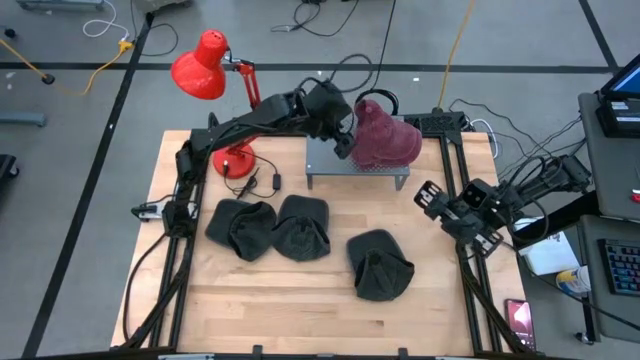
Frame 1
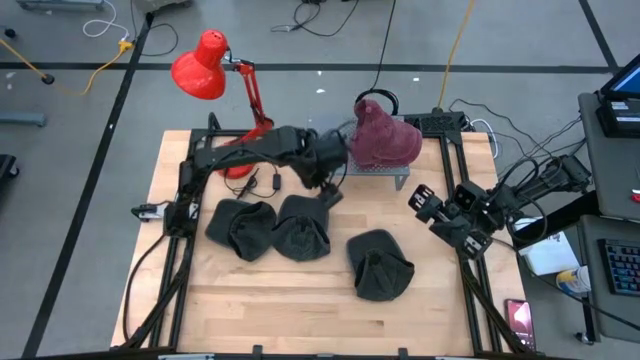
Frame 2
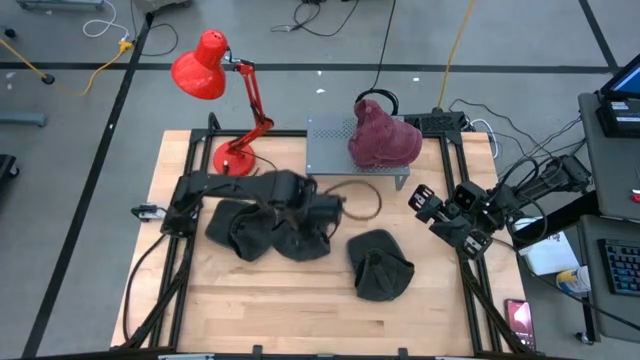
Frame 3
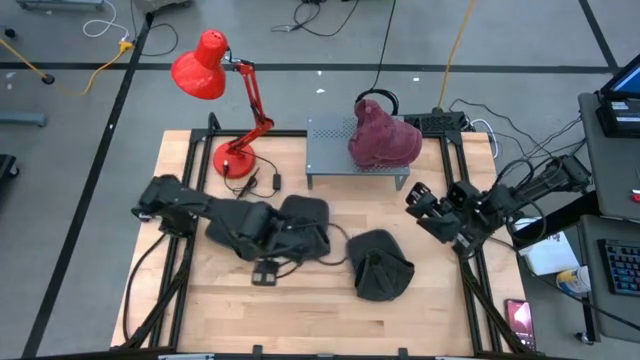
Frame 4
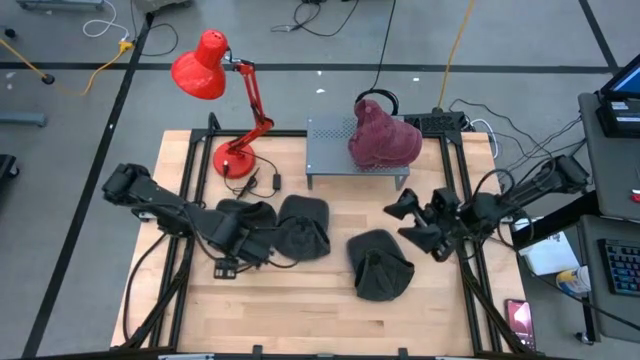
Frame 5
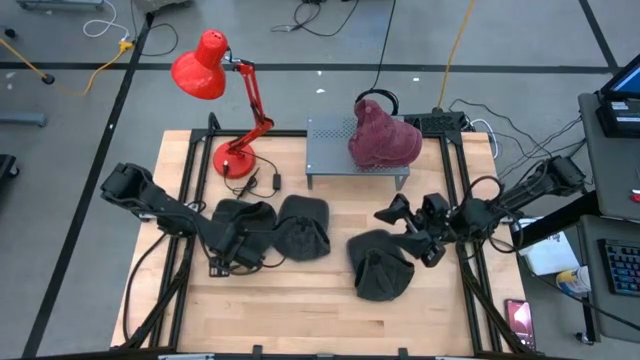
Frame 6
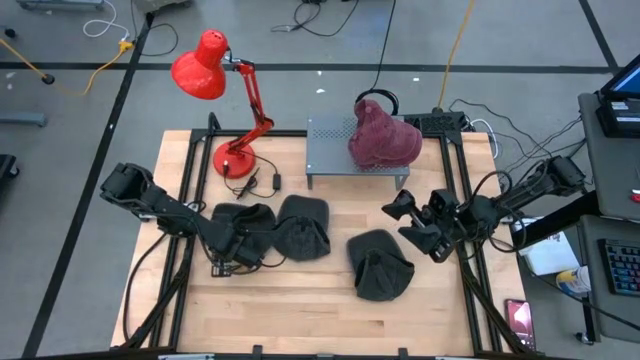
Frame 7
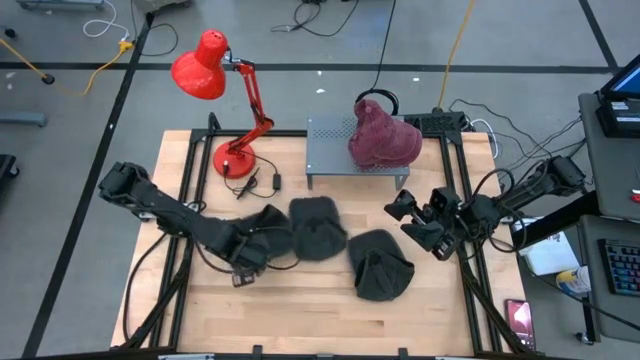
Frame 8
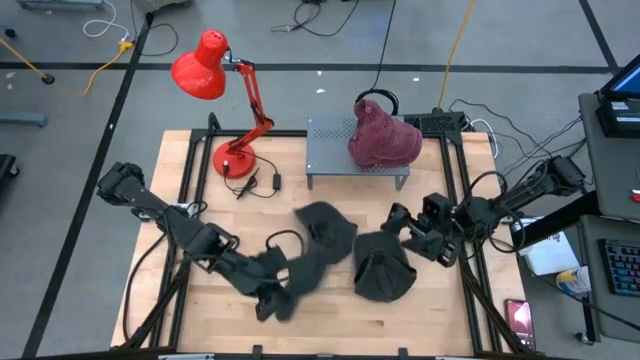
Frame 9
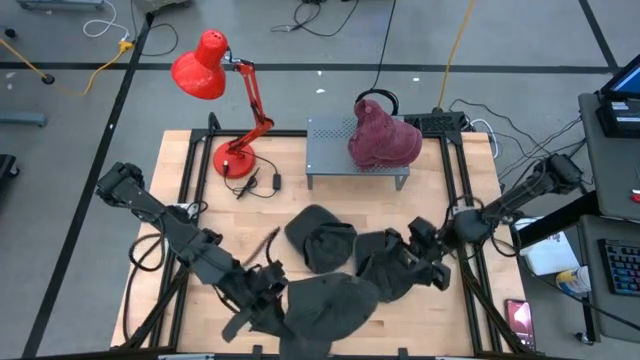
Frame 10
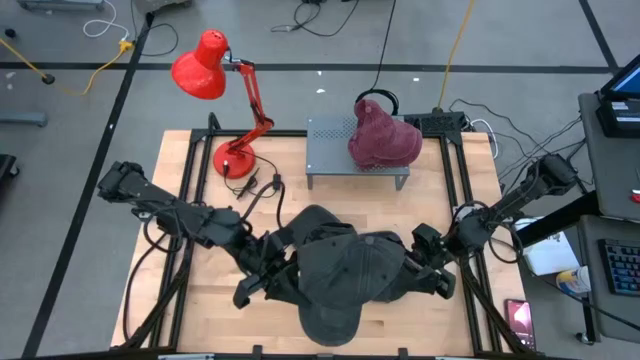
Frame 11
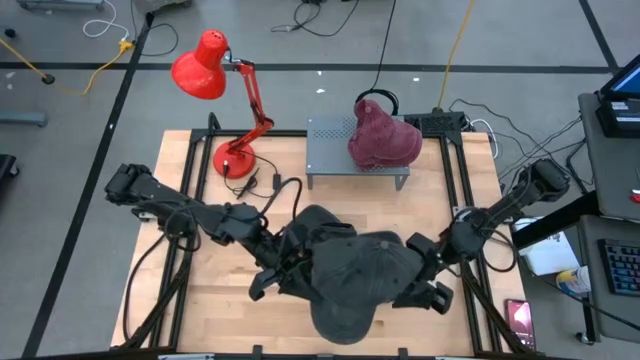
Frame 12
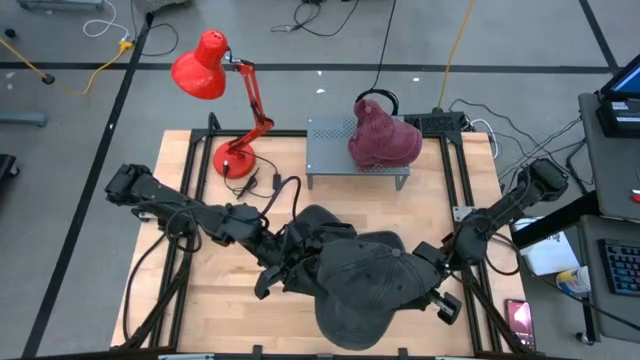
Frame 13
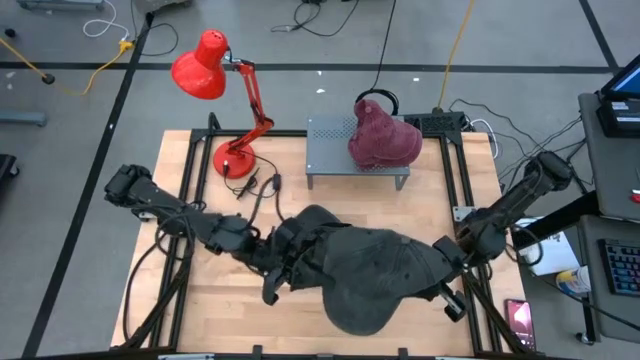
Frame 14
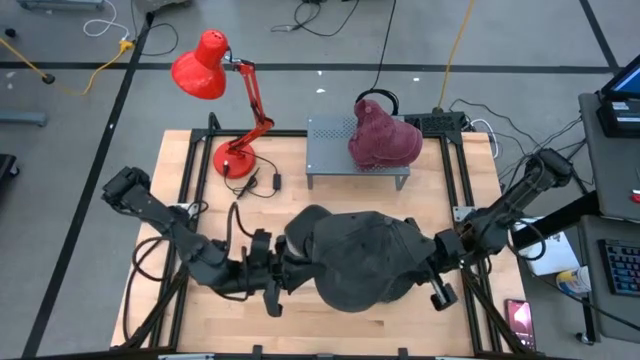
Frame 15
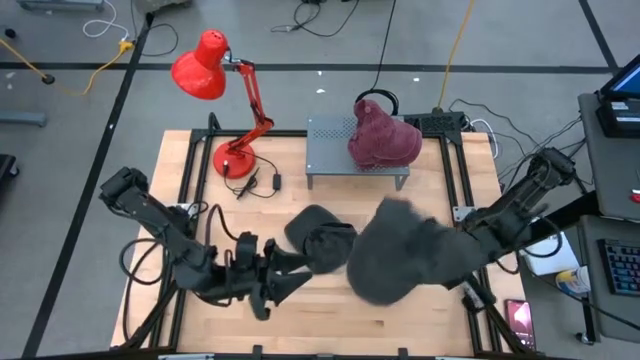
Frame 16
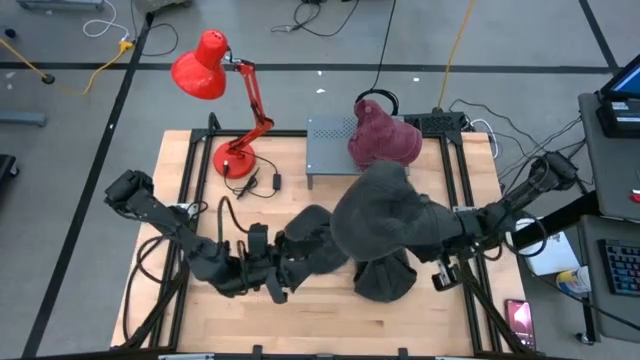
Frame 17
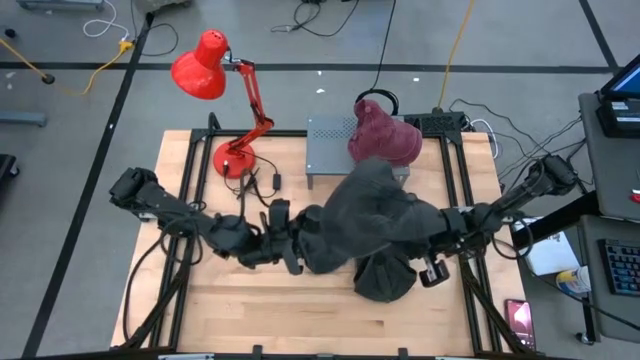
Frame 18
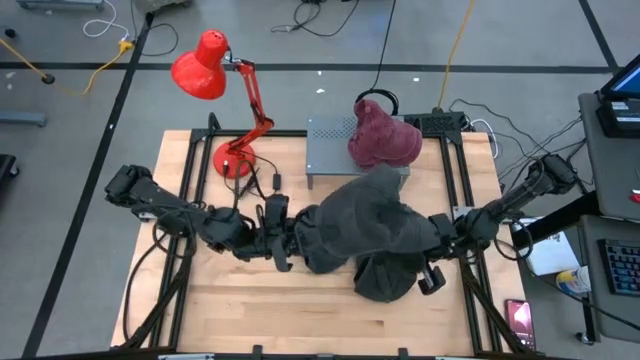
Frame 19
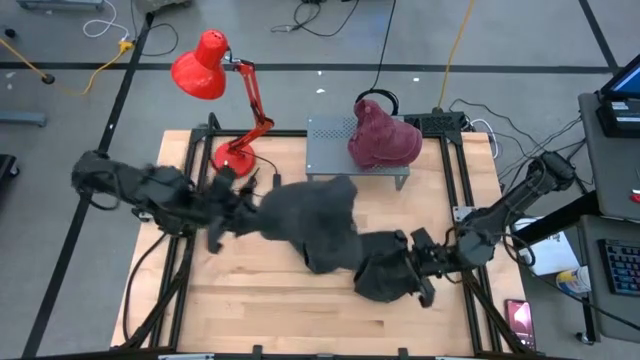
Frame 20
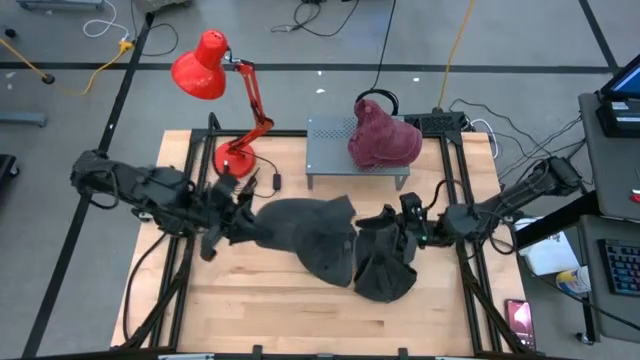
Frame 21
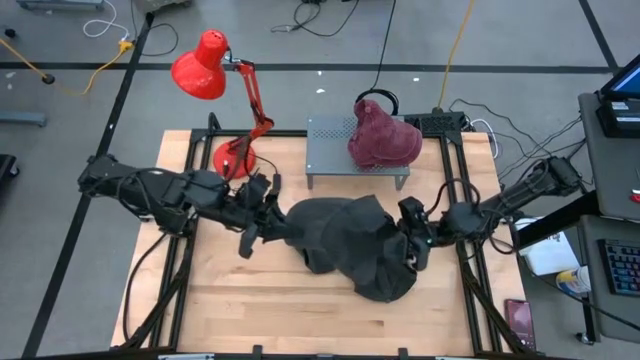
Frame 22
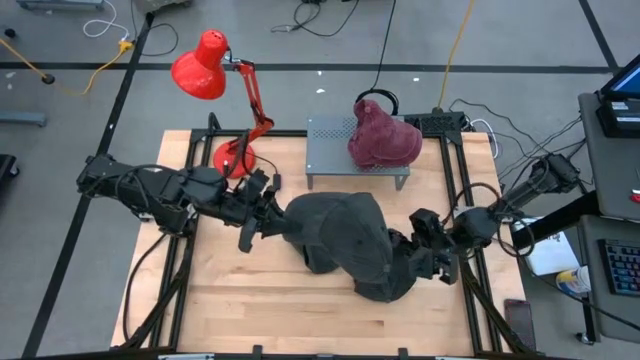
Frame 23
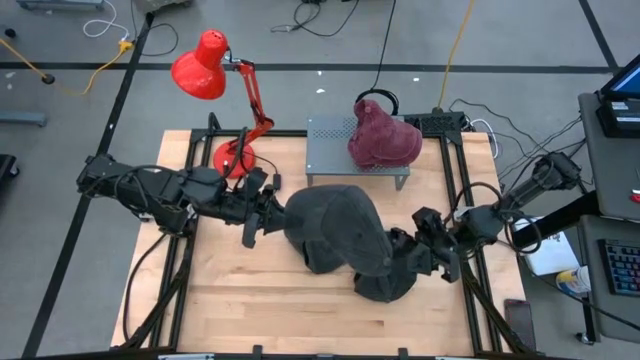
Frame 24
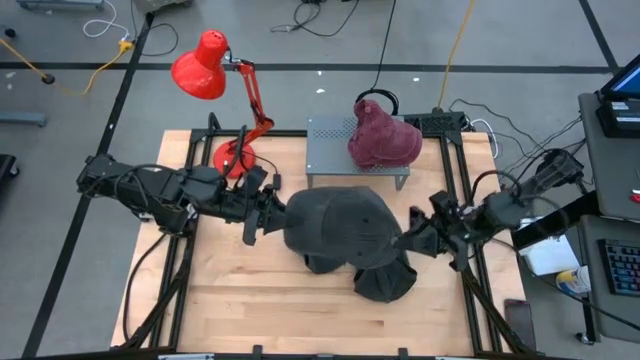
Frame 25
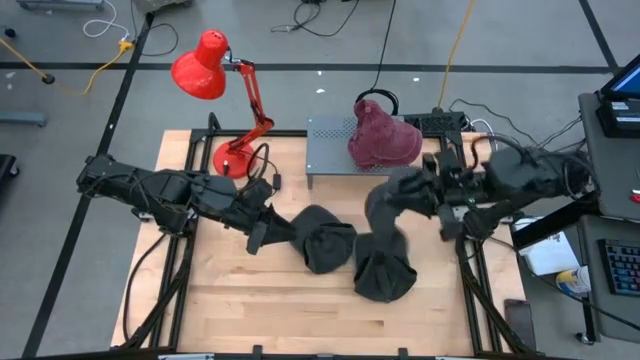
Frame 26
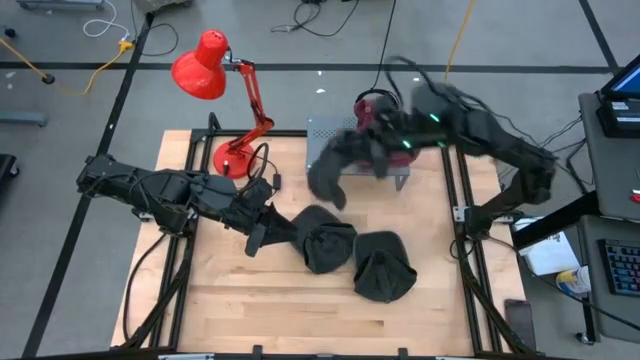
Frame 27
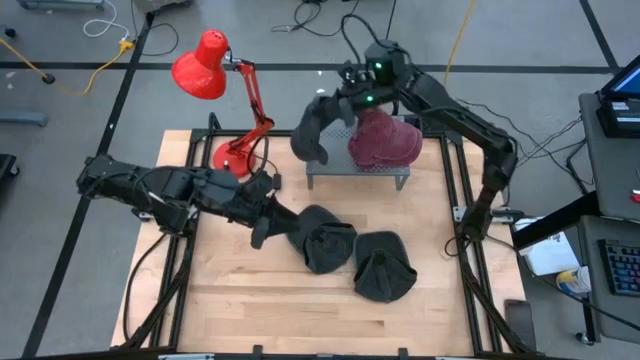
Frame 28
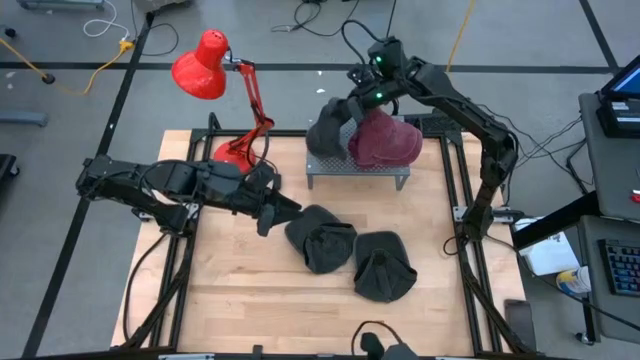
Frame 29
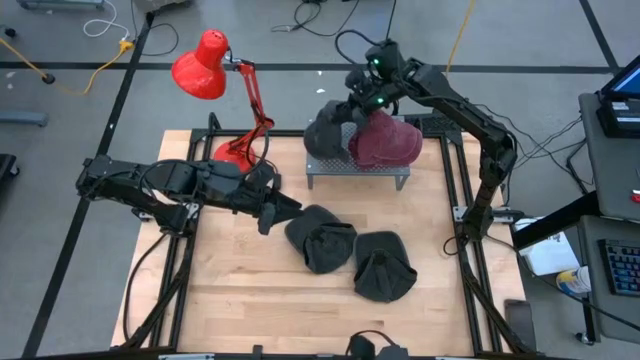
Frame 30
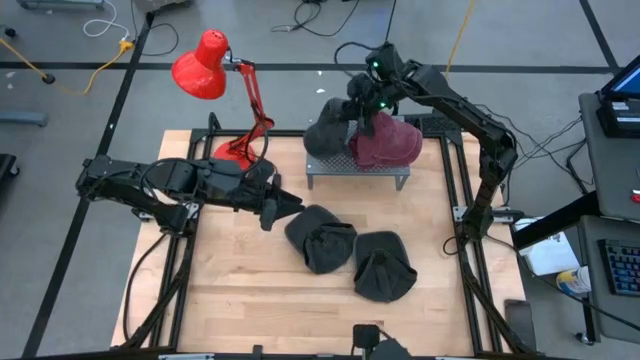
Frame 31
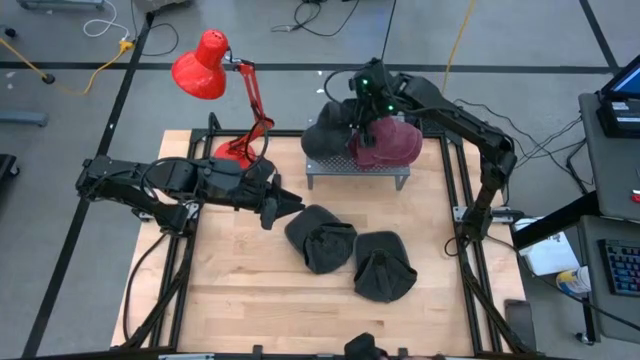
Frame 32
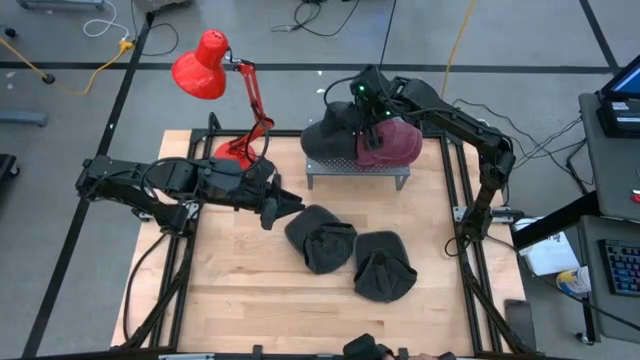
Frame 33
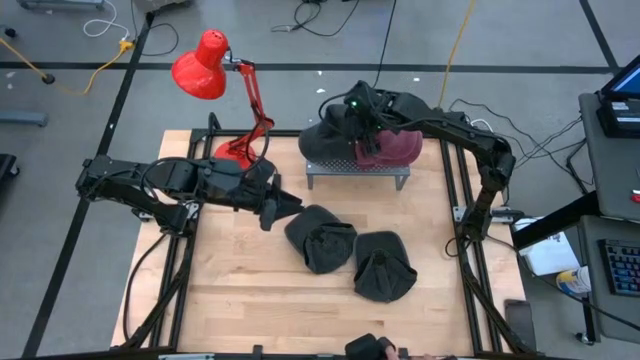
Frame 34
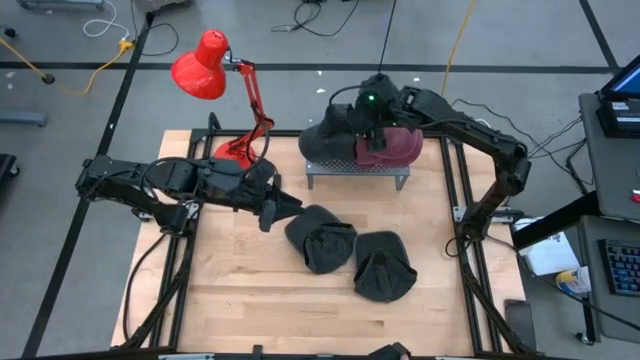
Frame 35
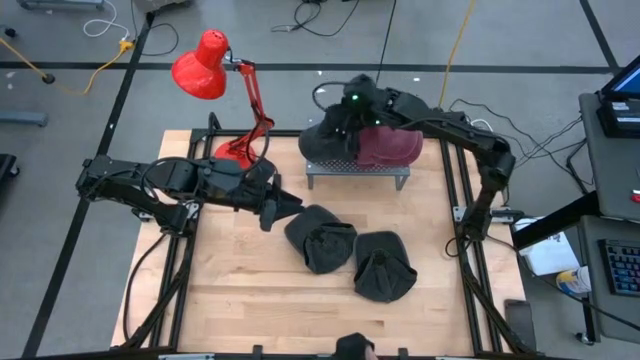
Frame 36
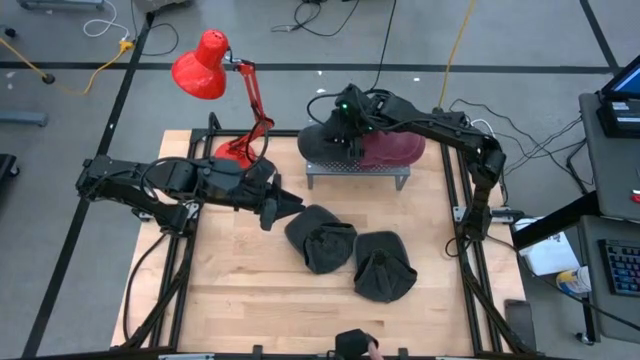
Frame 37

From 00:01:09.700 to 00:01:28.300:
Task: Pick & Place hat
Put the left black cap on the shelf

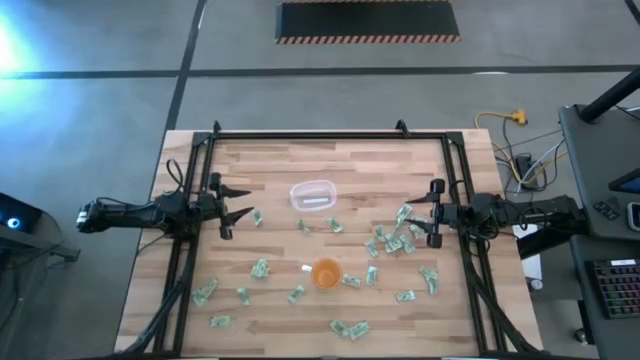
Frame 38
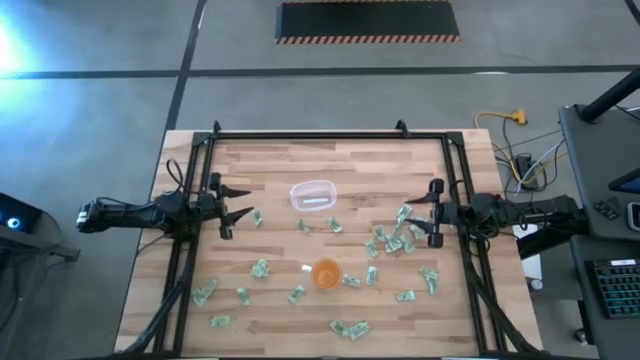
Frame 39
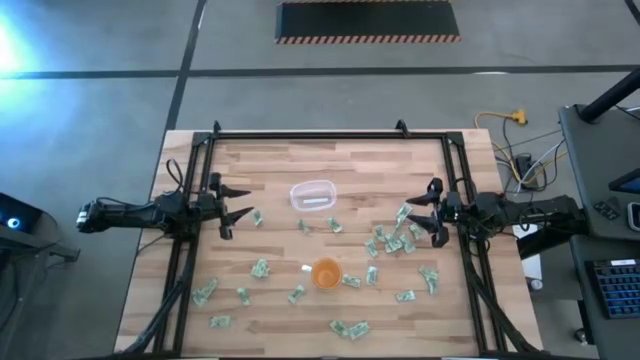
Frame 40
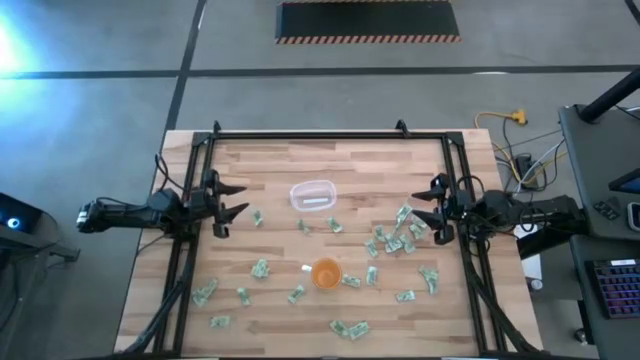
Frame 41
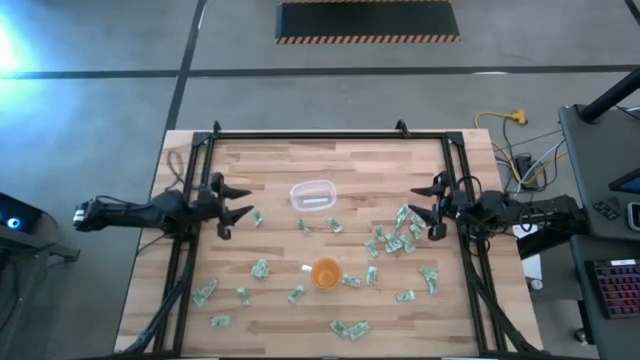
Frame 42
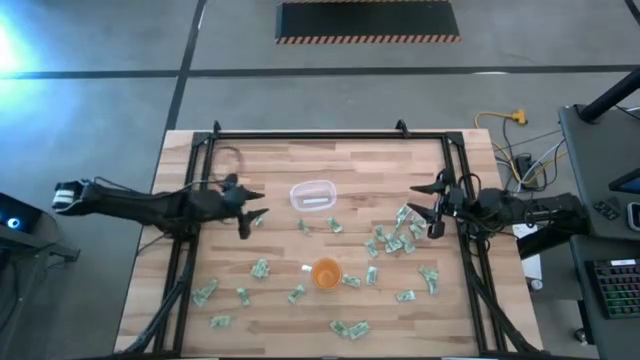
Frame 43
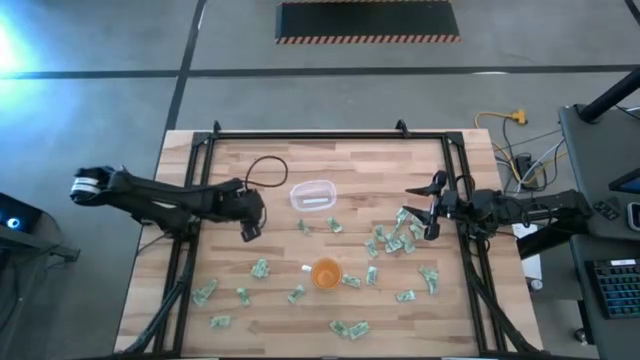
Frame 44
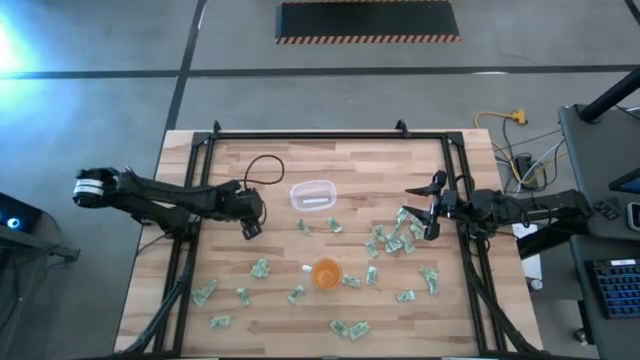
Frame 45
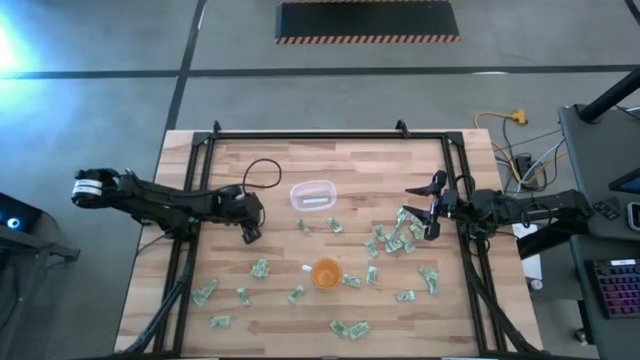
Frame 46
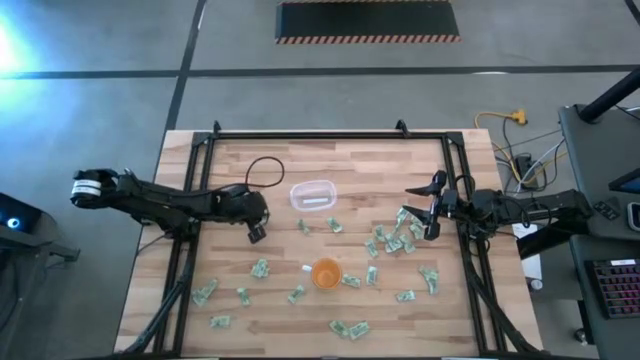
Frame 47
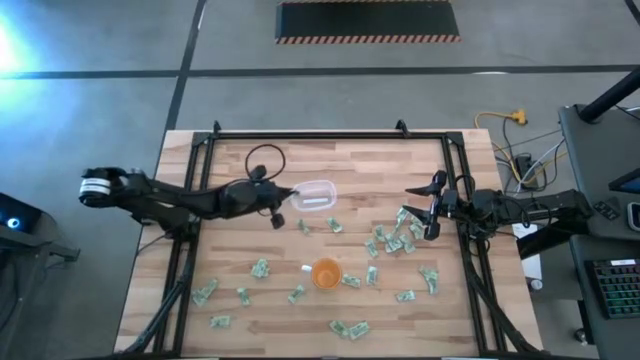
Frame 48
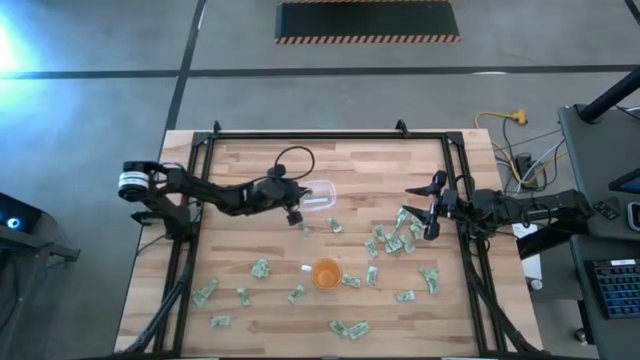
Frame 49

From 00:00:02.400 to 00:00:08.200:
Task: Pick and place Stevia / Truvia into bins
Put the stevia packet into the transparent bin
